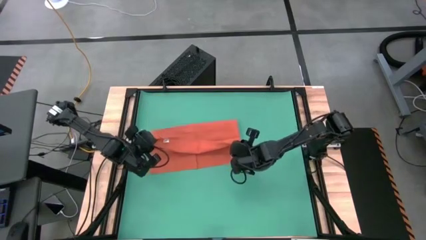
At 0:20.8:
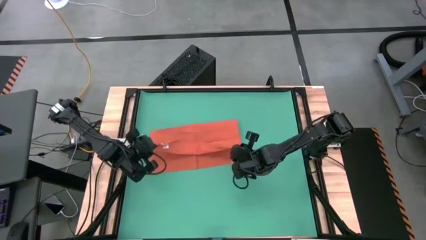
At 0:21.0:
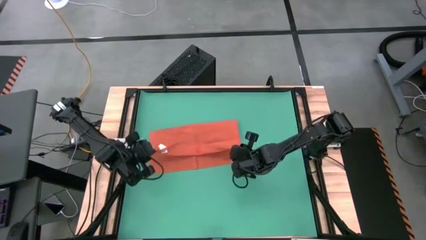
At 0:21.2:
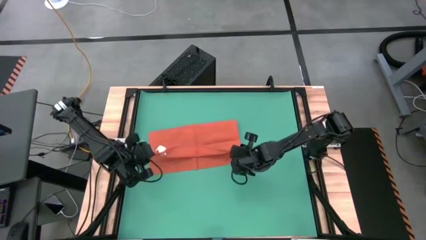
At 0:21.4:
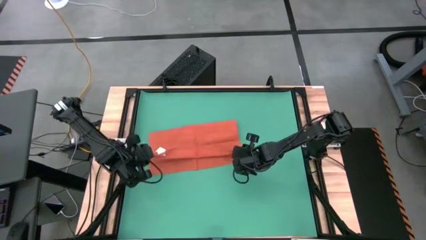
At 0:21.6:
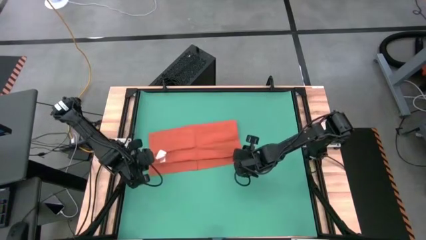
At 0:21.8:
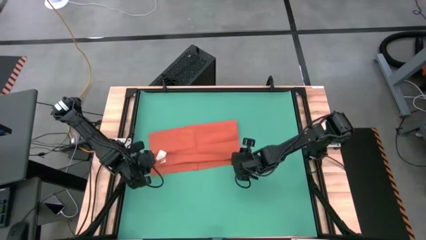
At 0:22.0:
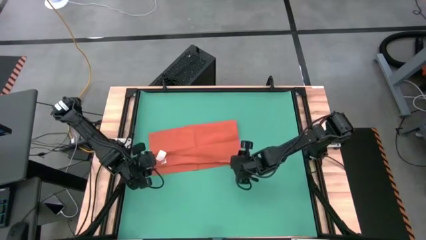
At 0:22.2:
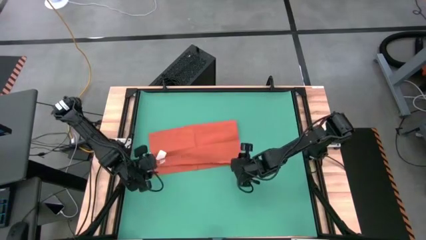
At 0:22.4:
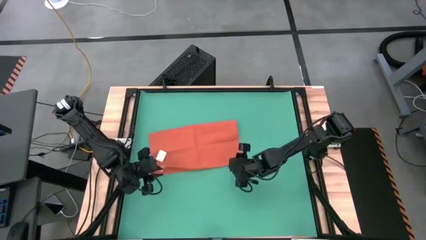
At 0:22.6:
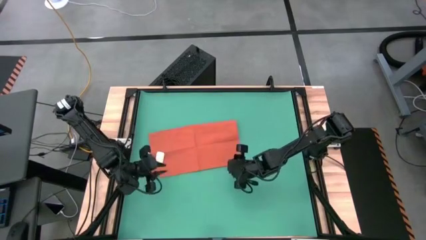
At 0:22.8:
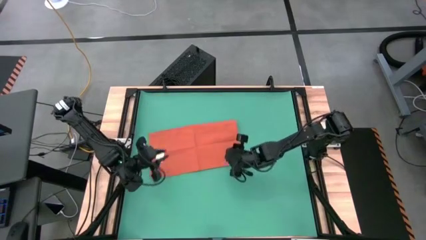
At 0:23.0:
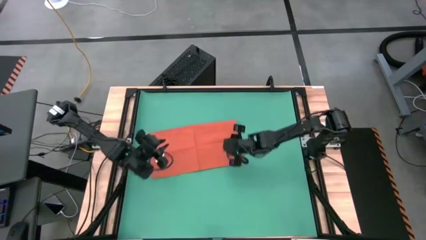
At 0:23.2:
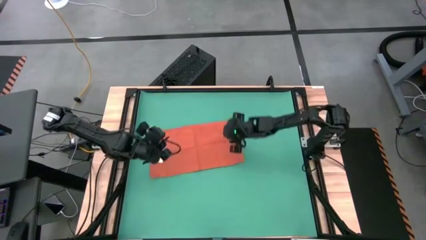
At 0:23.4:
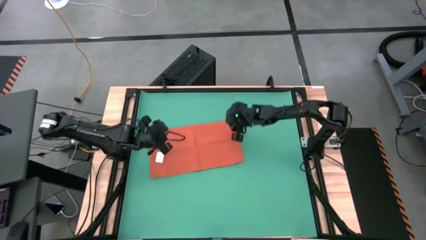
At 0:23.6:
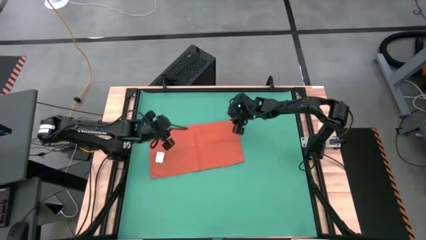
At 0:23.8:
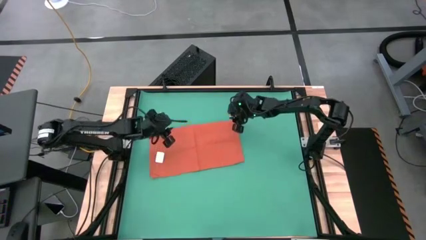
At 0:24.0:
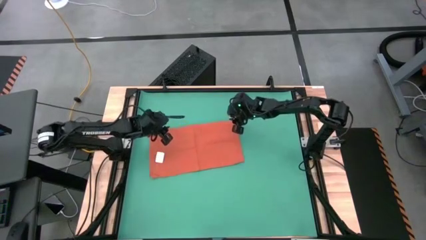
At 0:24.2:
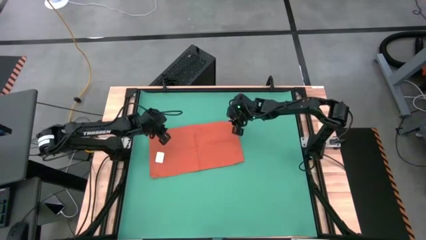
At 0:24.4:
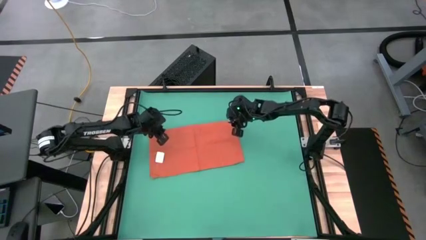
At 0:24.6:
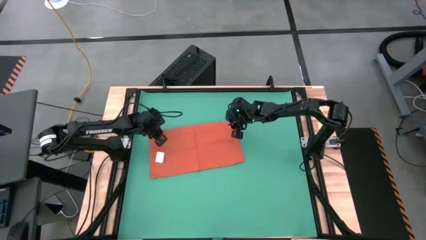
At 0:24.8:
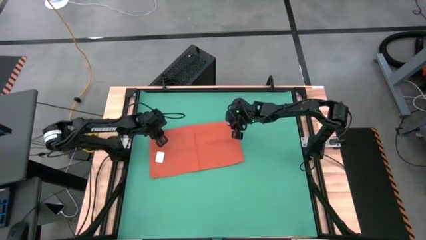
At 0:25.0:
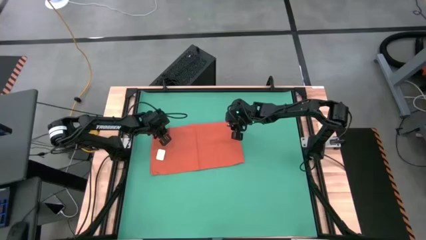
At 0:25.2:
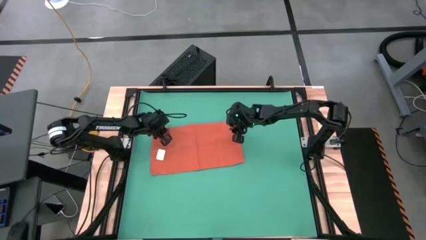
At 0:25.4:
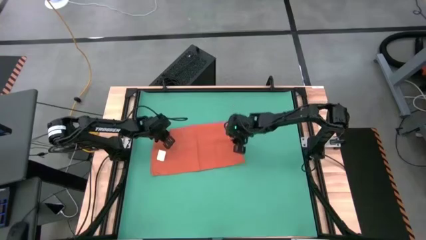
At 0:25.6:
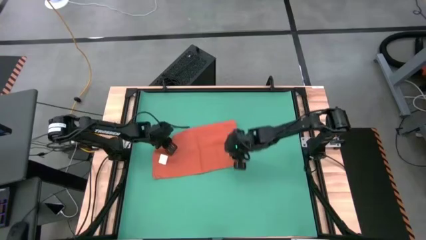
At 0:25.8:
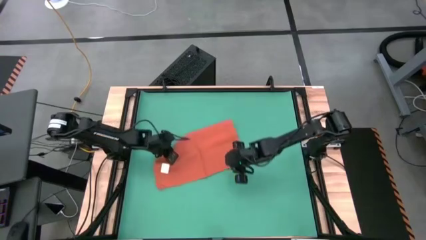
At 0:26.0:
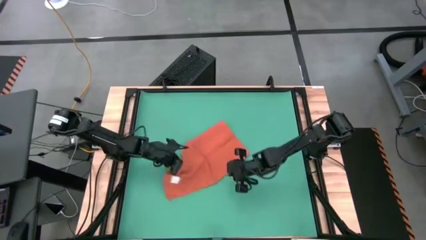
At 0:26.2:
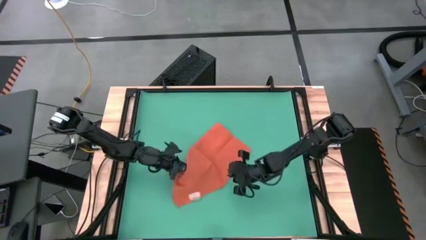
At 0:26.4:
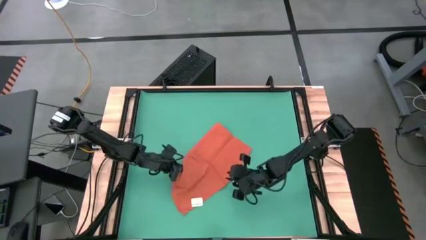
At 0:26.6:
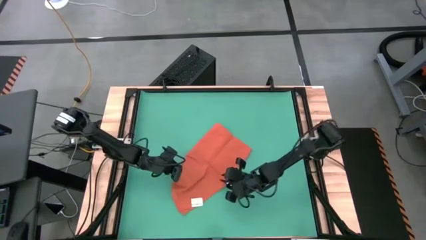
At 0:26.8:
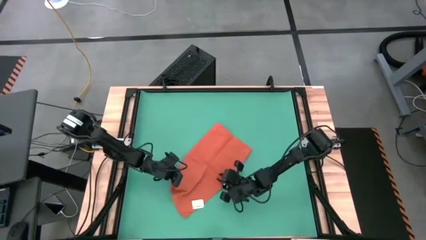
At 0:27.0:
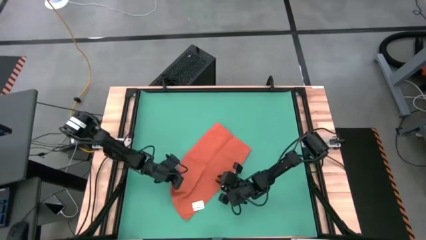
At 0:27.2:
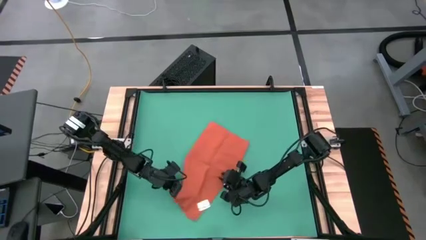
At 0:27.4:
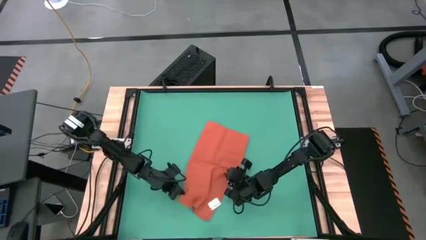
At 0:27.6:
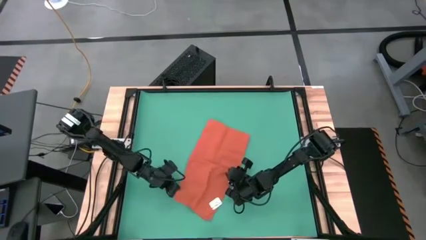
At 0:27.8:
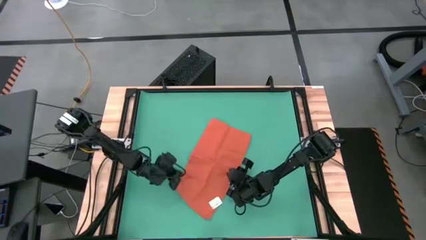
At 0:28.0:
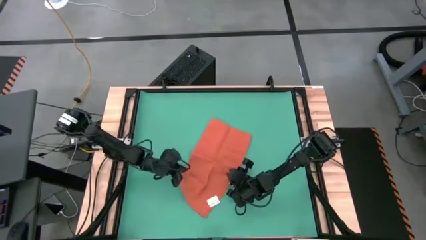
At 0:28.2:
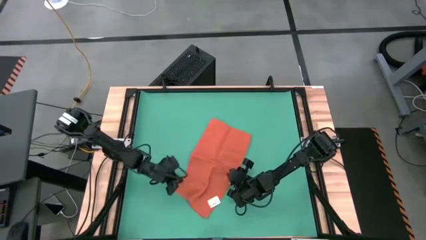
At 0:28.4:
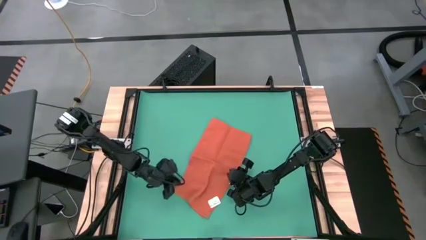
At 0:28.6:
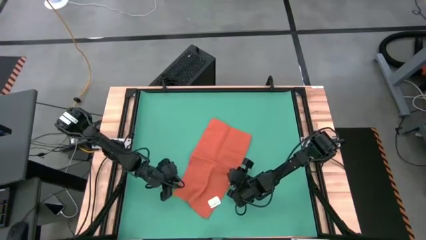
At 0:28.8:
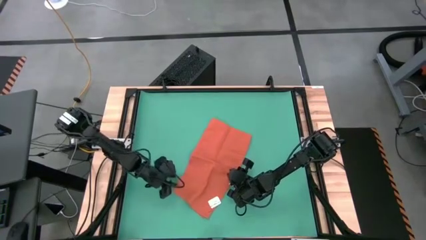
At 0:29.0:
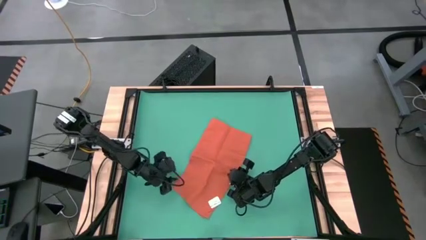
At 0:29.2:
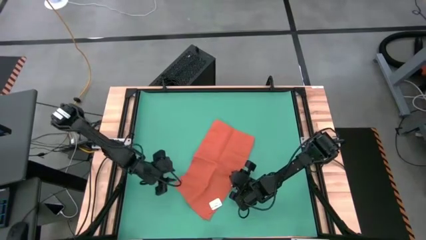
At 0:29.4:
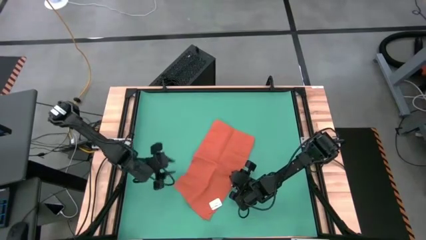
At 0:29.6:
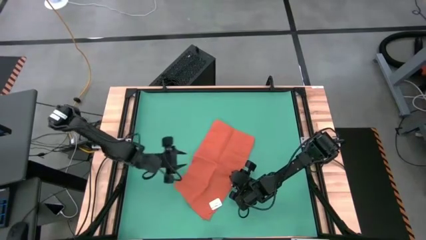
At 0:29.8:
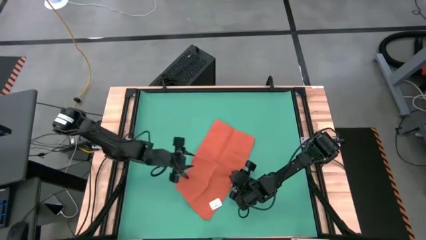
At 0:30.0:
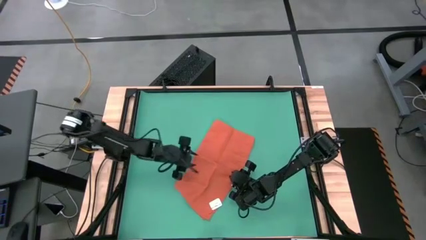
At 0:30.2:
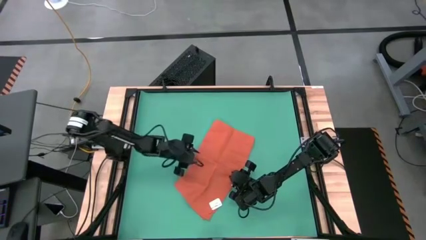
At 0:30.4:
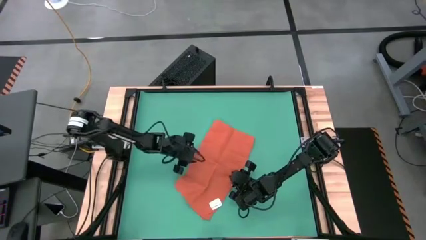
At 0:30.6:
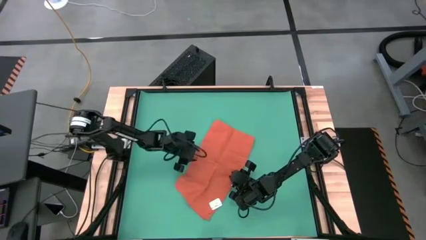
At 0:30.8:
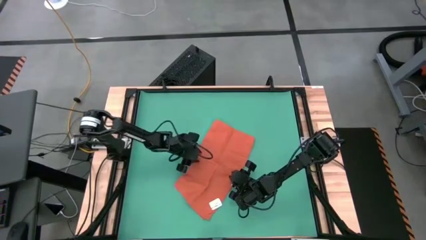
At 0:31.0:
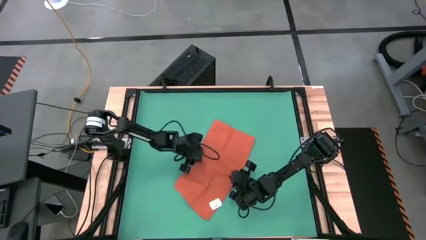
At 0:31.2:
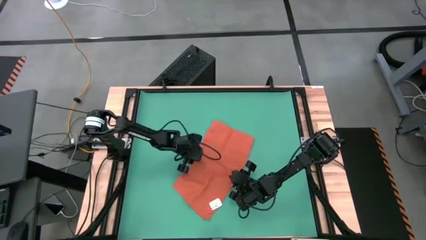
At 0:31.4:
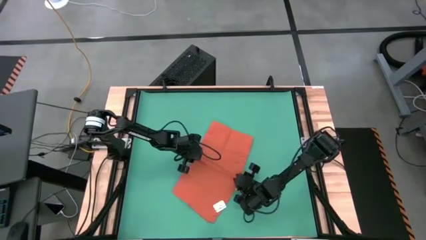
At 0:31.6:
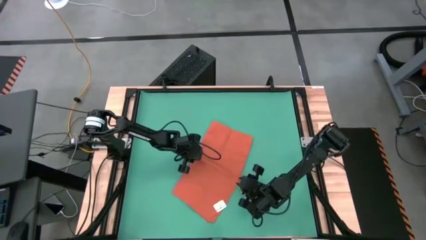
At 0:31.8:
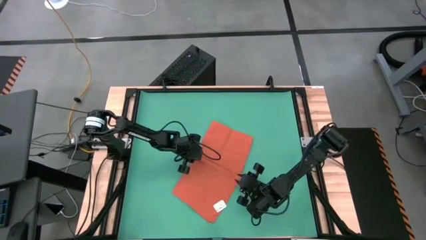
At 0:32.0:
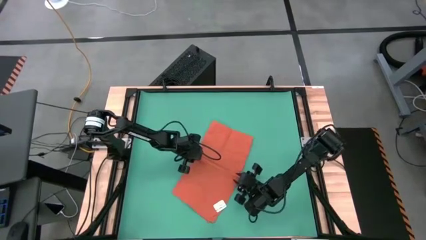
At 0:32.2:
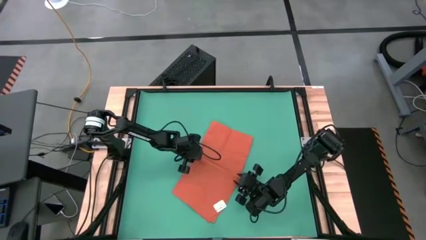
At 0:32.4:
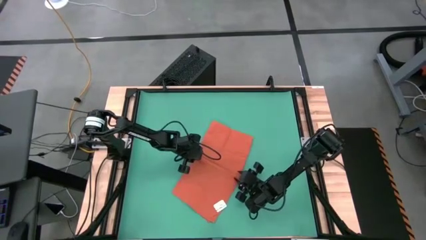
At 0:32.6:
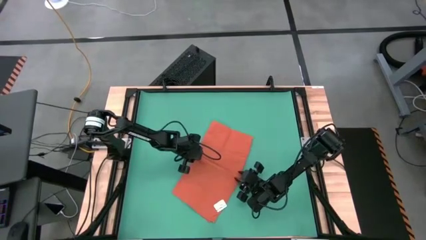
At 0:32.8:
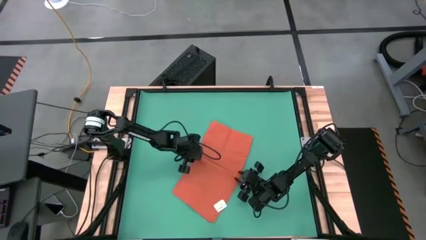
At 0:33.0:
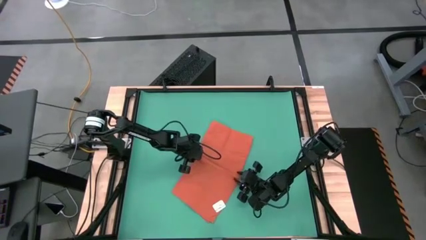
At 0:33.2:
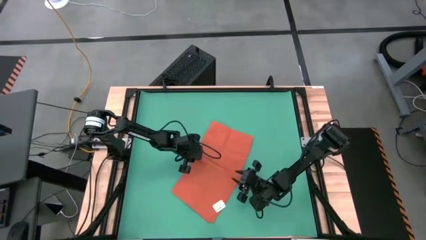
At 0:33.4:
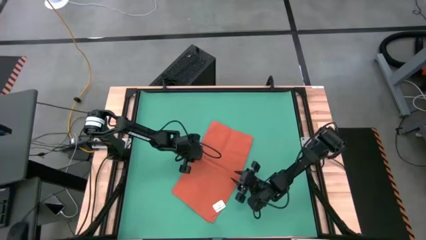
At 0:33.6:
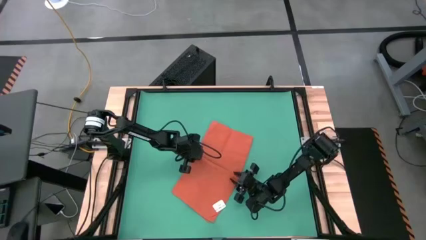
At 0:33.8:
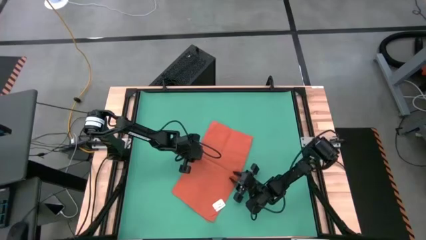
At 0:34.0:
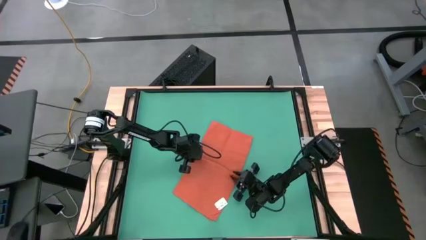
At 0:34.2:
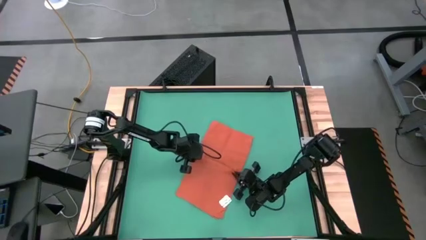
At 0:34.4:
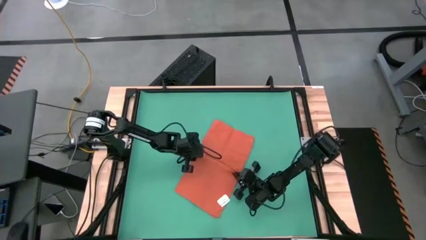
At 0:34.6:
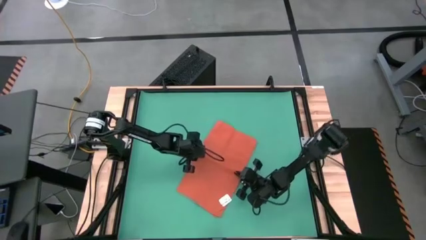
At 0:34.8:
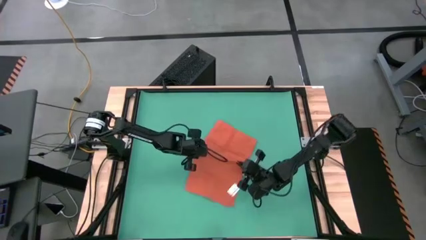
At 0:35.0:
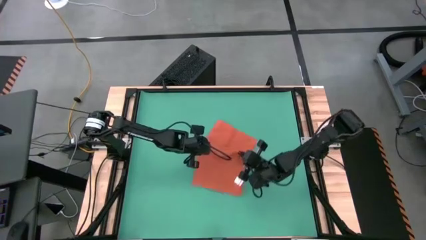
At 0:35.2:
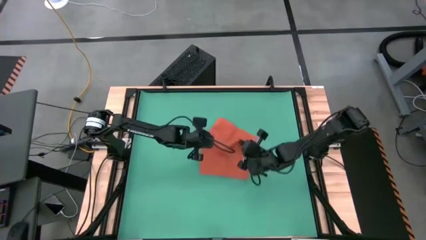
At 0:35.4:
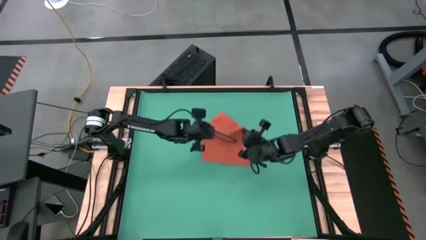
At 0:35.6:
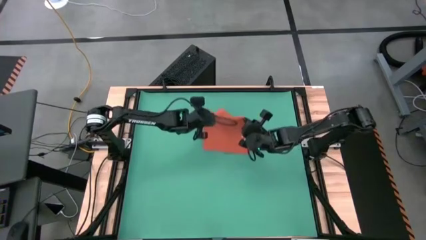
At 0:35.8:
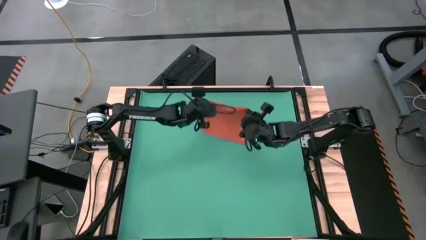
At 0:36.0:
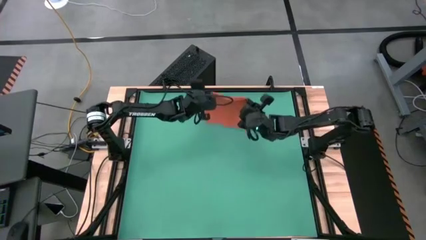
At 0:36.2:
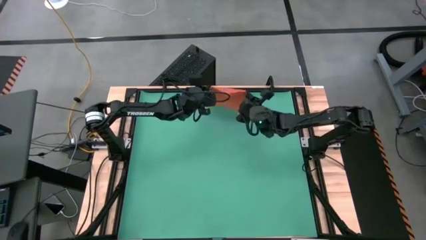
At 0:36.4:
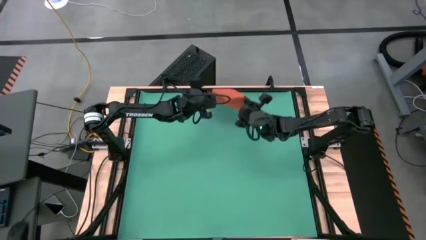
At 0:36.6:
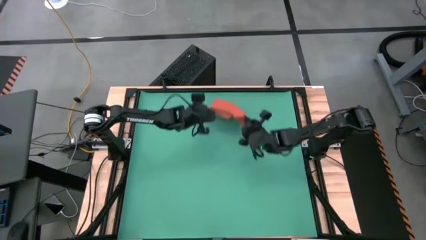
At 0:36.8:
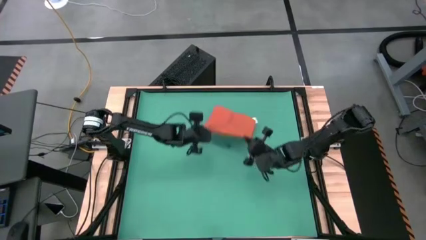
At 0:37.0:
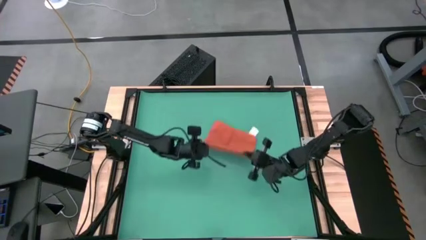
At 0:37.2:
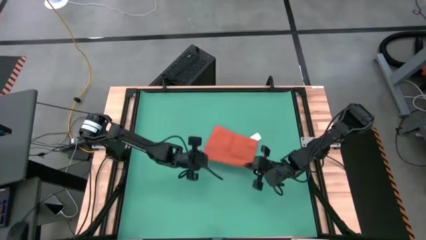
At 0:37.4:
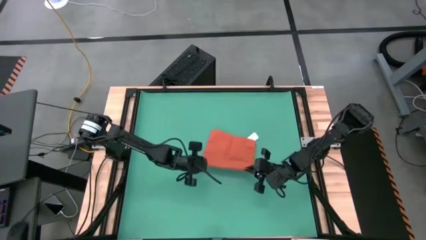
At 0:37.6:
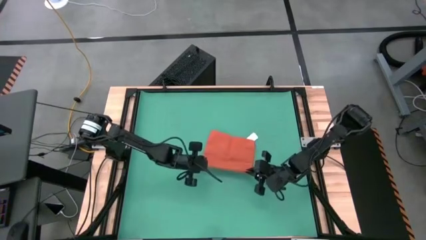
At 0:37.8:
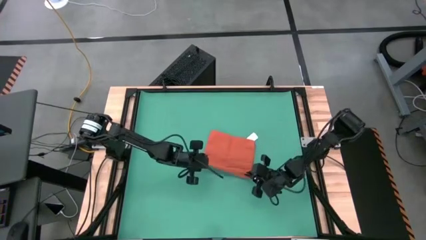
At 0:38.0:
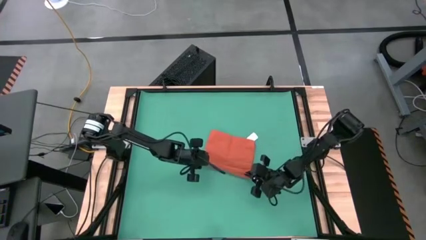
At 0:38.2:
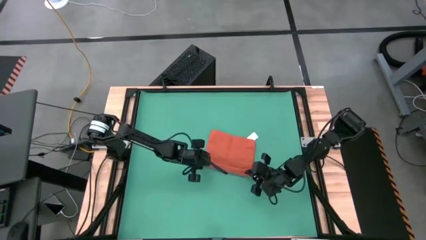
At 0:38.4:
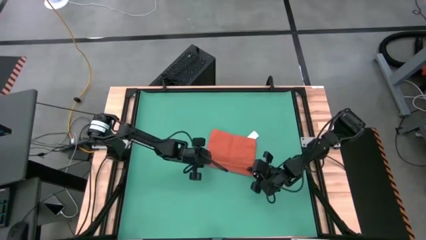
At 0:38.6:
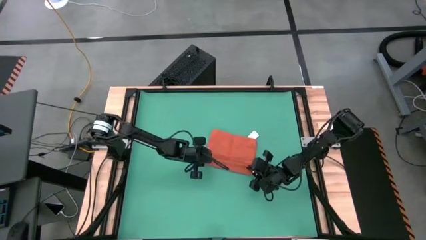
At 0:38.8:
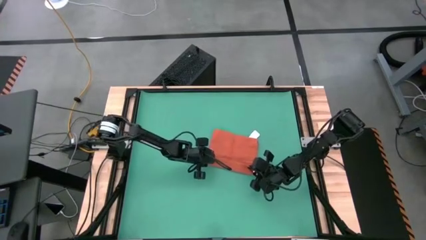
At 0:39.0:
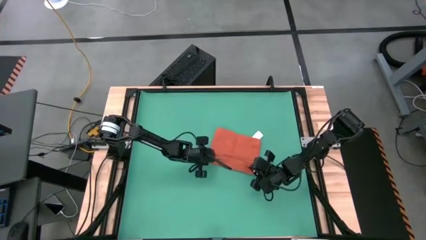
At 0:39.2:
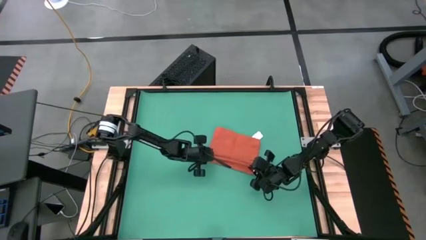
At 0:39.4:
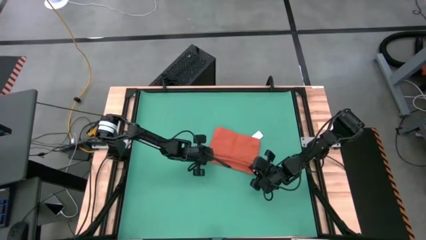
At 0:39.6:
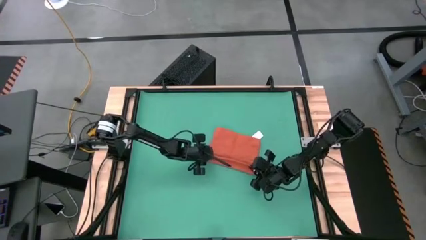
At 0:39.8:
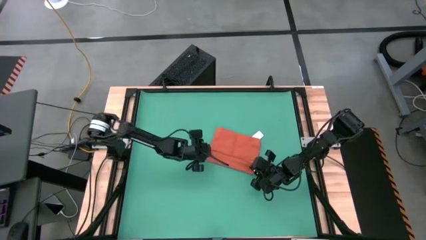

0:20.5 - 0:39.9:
Task: Roll towel
Fold the orange towel
